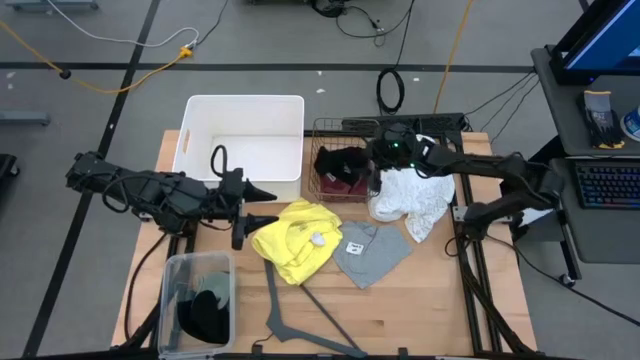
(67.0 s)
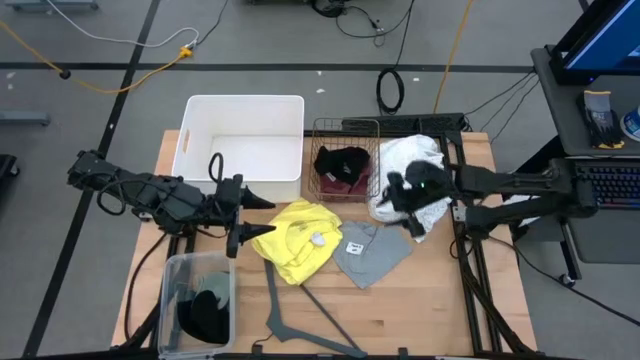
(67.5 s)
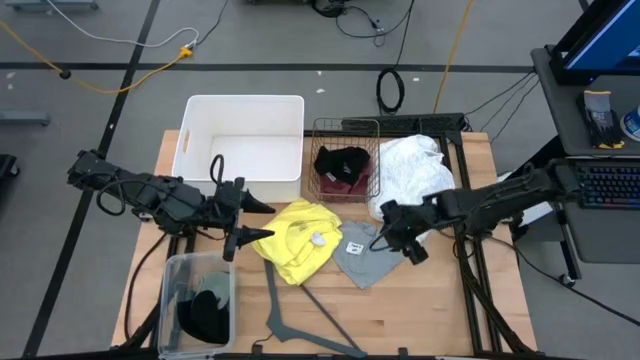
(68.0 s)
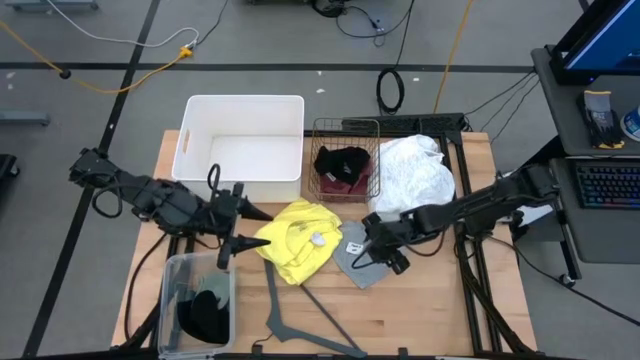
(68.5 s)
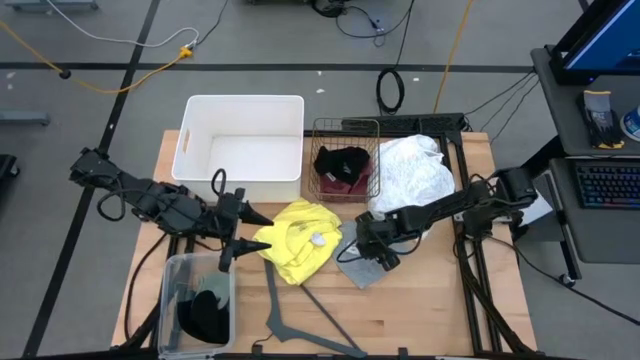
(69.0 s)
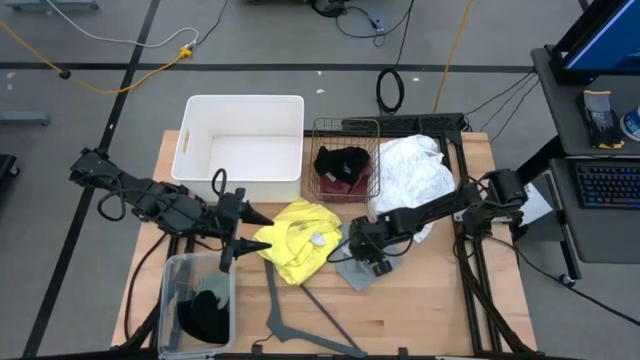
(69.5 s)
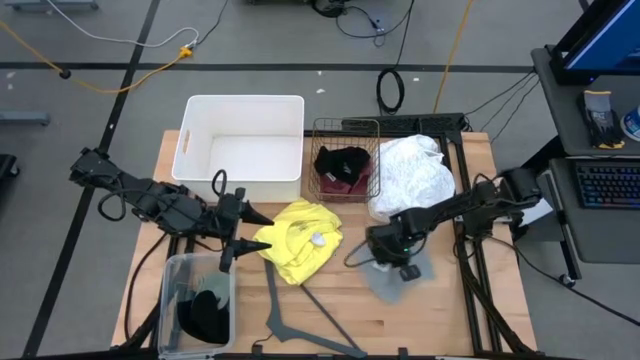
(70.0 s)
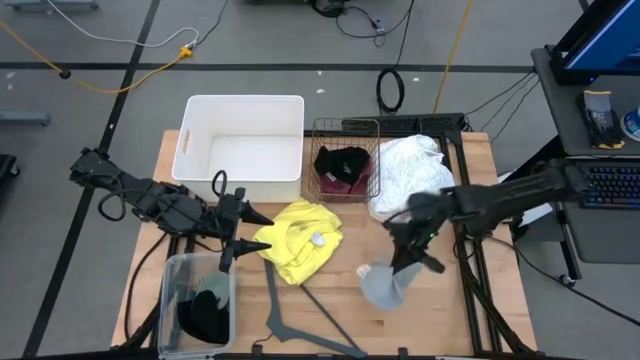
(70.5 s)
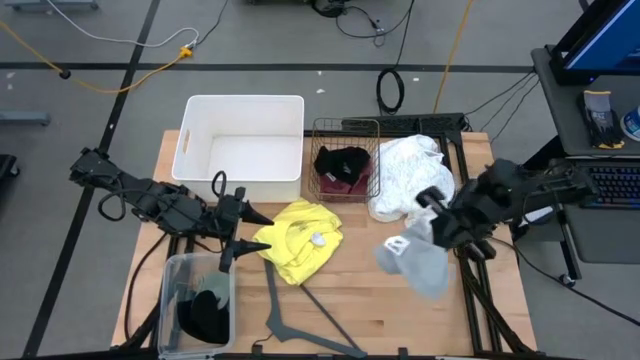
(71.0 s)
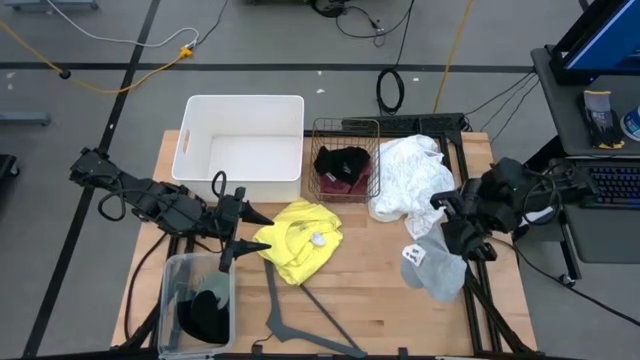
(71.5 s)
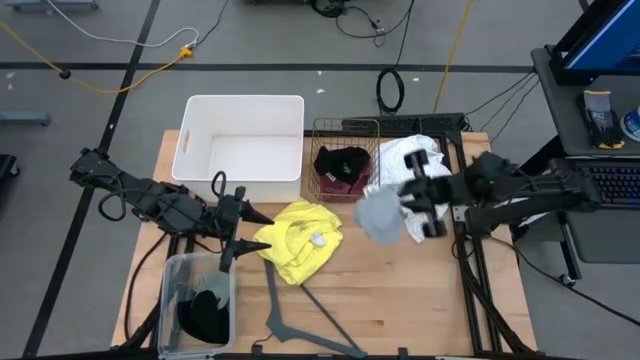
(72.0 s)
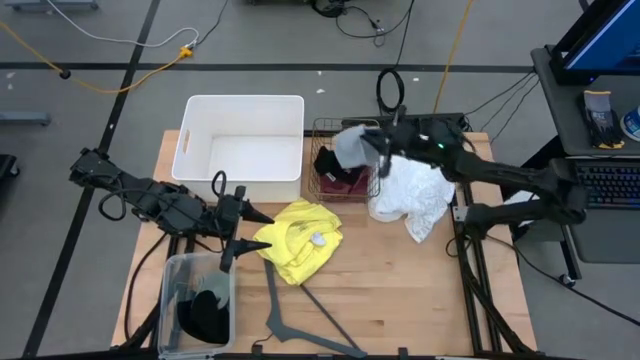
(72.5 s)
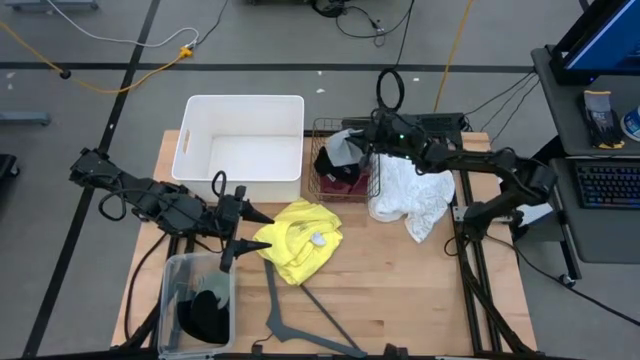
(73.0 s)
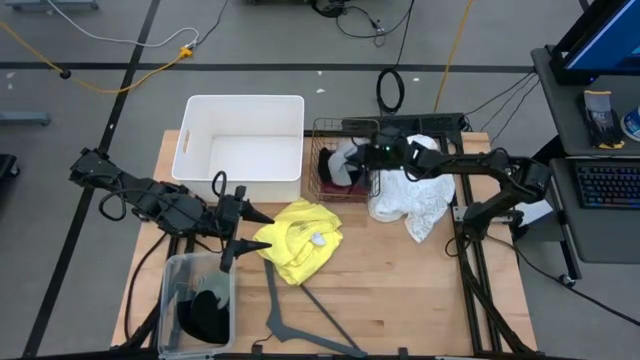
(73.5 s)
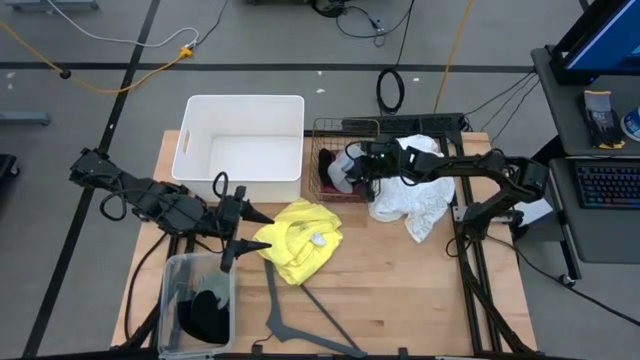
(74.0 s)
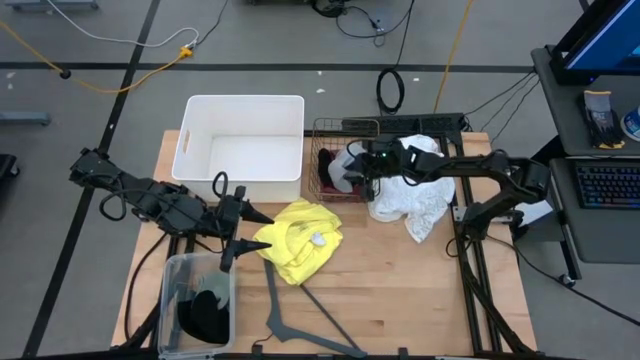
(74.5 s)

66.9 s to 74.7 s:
Task: Pick & Place Cloths
Put the gray boxer into the wire basket

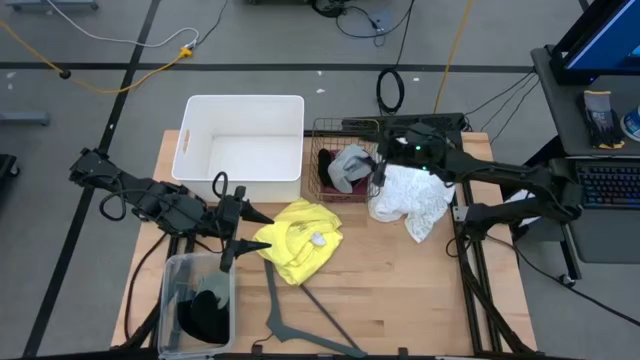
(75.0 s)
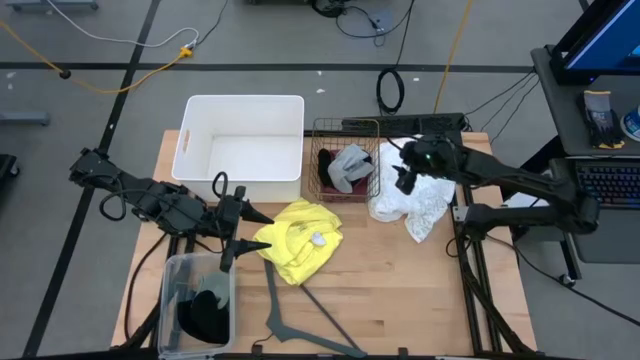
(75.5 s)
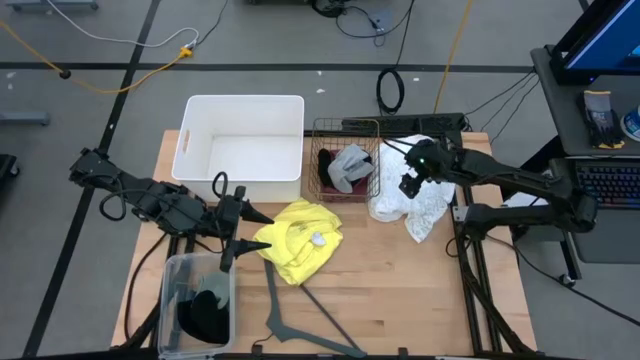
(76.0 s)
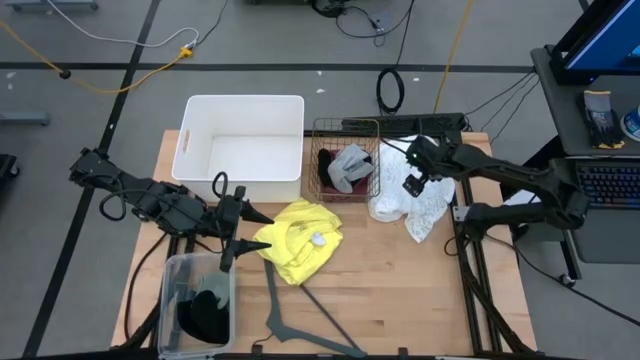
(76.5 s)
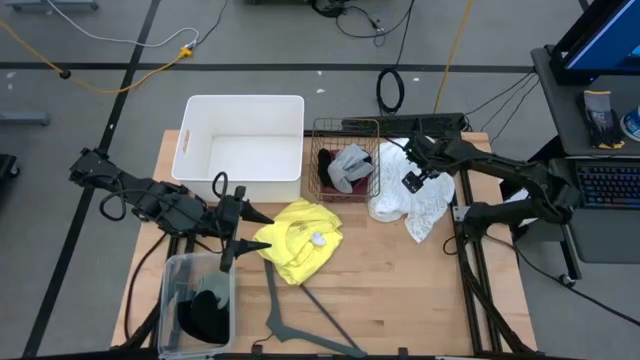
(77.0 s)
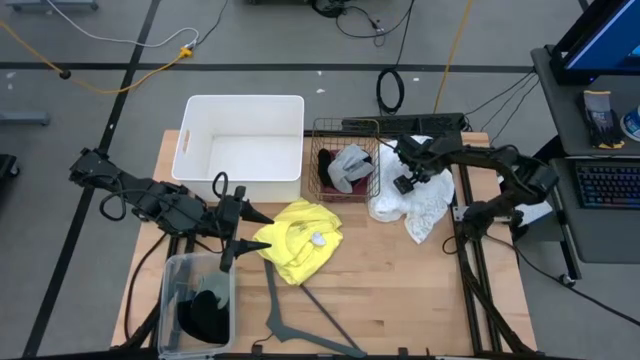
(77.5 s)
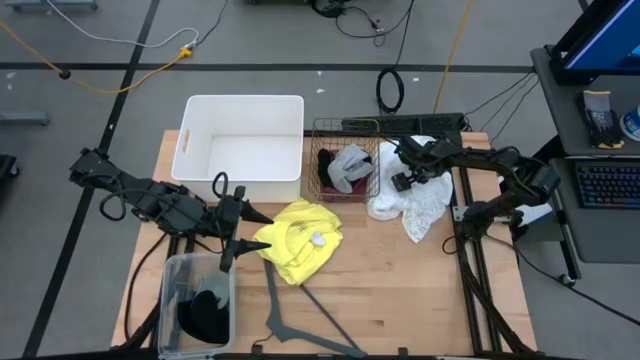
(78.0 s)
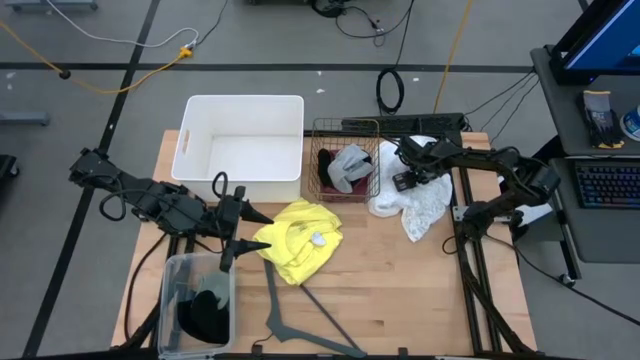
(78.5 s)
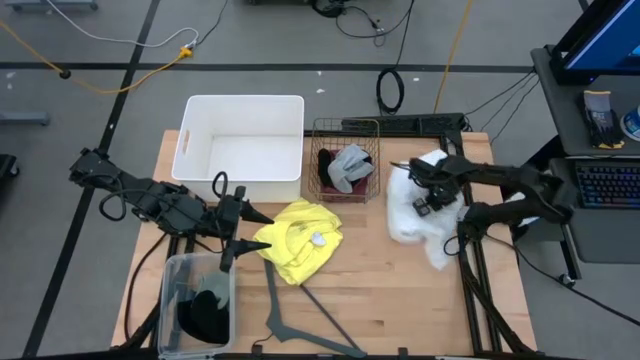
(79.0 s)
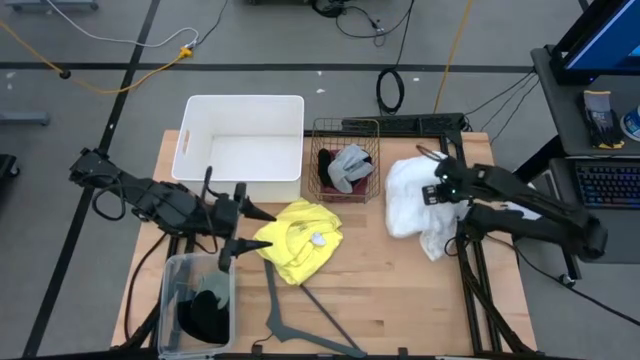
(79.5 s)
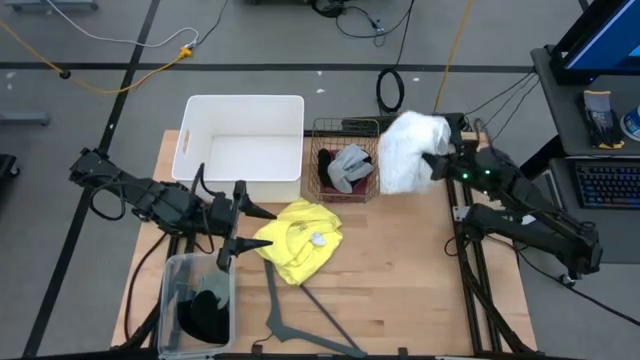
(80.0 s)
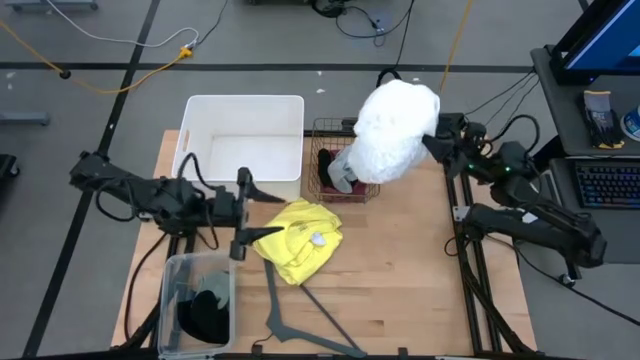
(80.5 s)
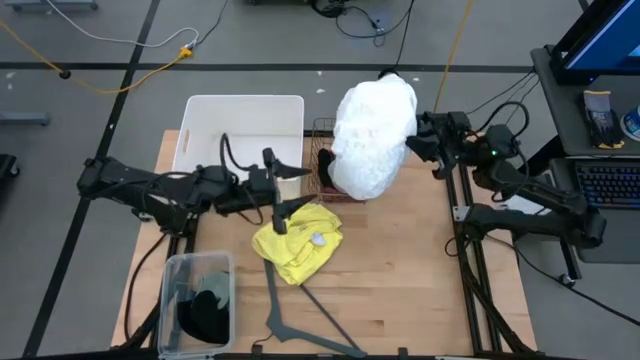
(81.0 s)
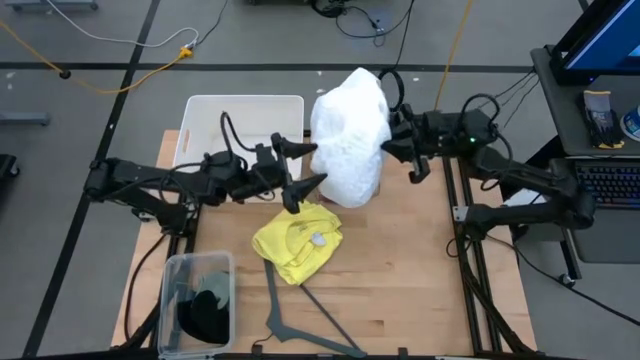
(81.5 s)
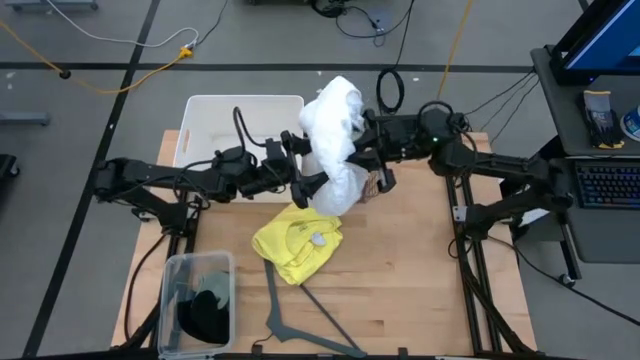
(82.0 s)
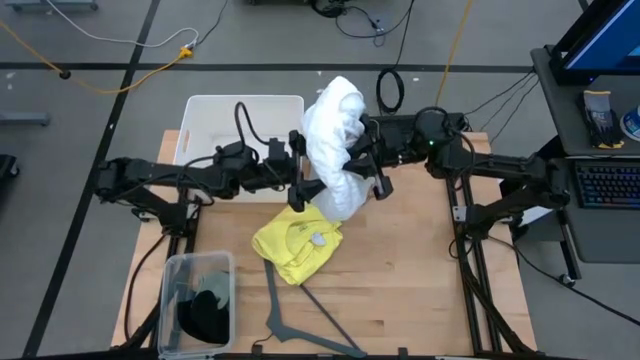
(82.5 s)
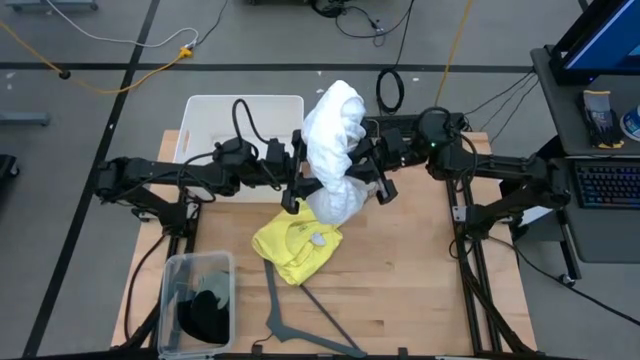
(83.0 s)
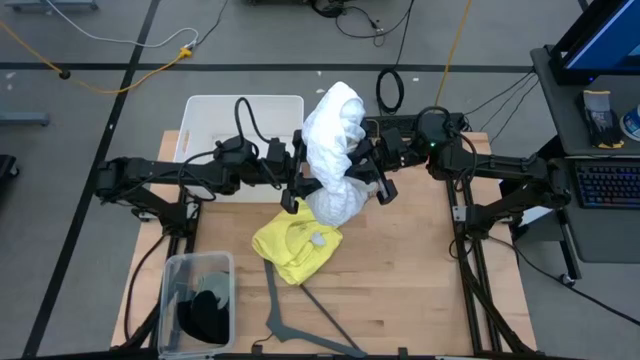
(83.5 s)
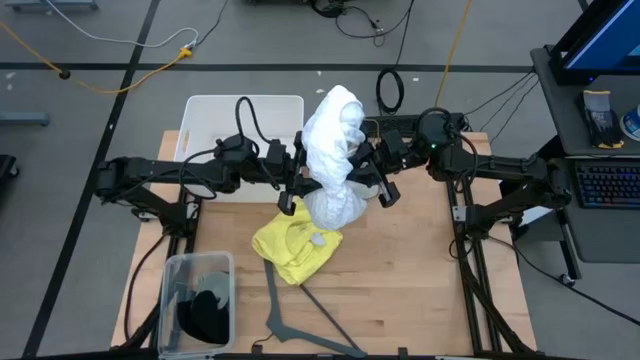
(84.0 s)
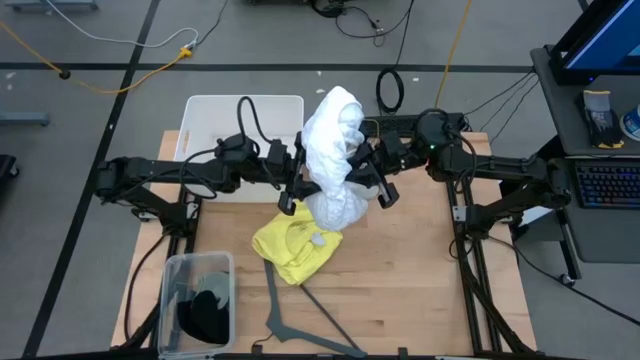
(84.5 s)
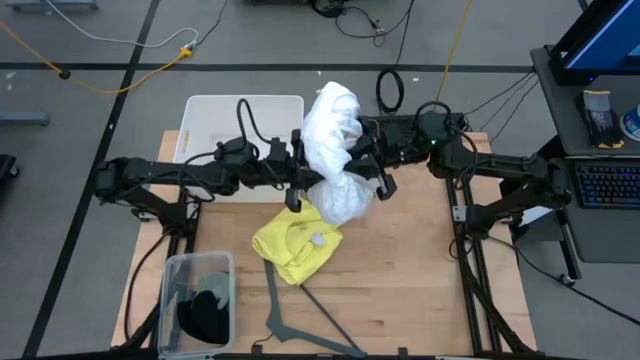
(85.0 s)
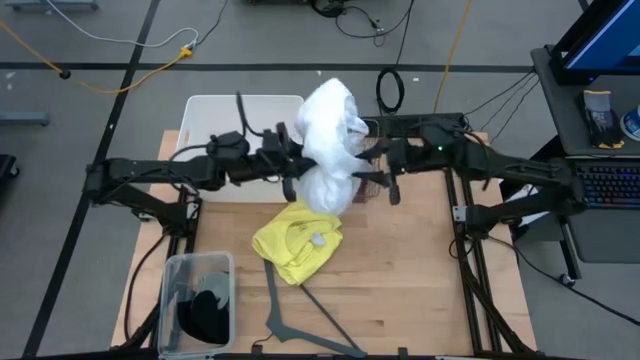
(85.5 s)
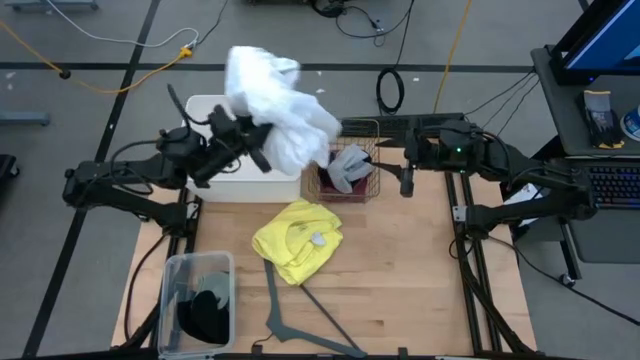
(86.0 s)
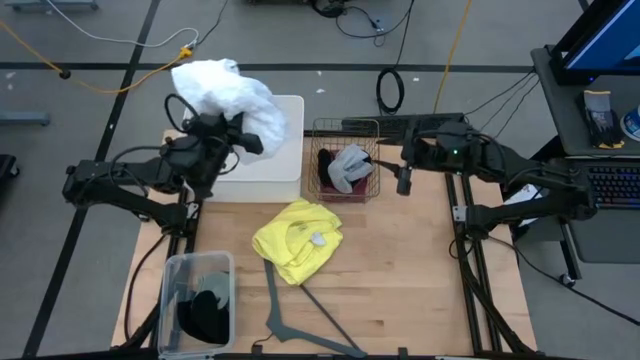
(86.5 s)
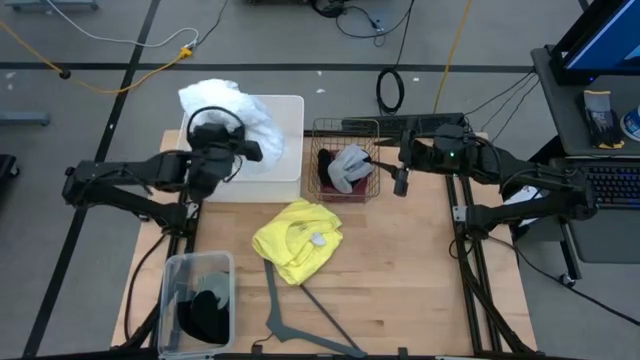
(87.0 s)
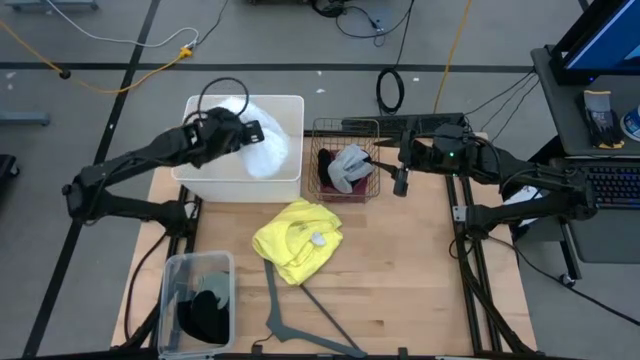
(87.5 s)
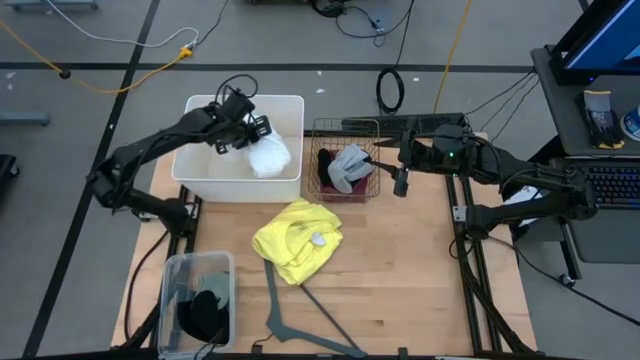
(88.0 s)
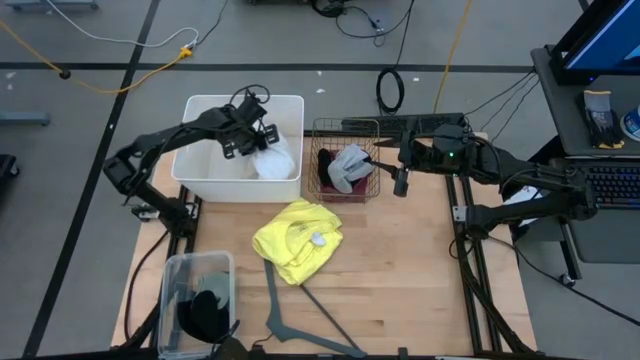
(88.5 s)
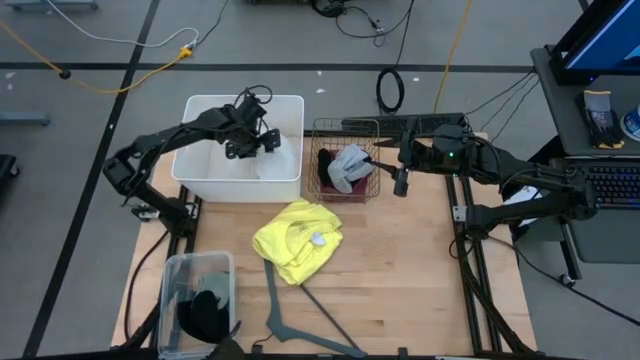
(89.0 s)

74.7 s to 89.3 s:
Put the white dress into the white bin
